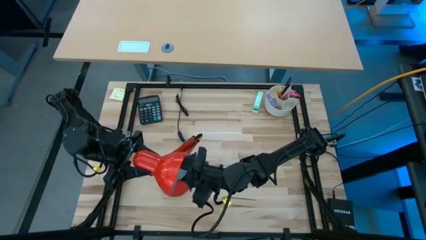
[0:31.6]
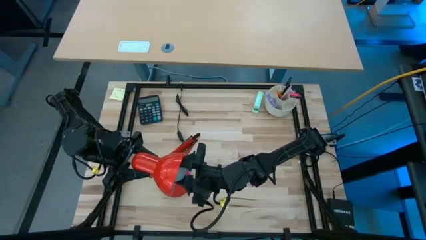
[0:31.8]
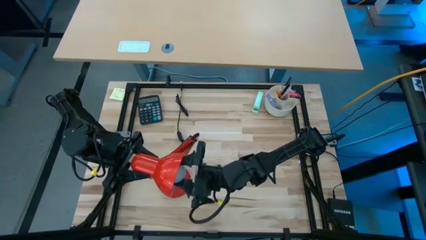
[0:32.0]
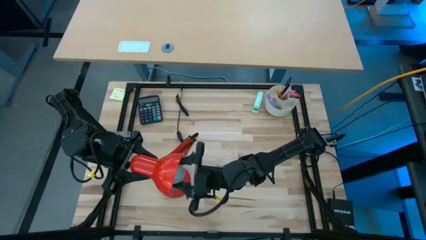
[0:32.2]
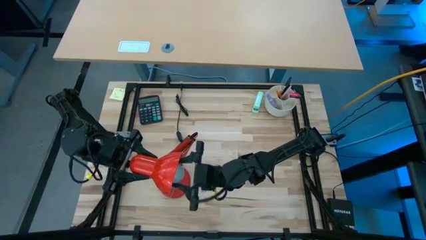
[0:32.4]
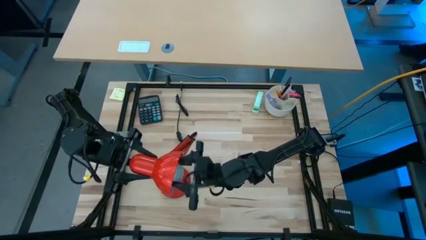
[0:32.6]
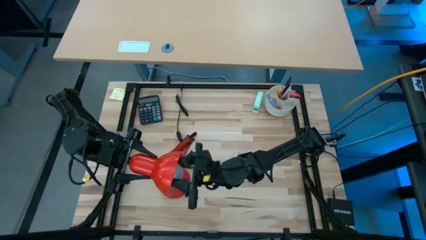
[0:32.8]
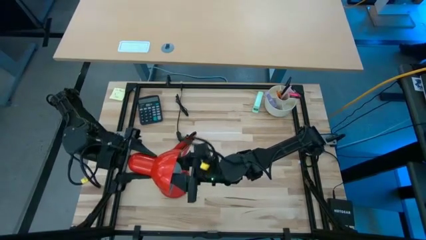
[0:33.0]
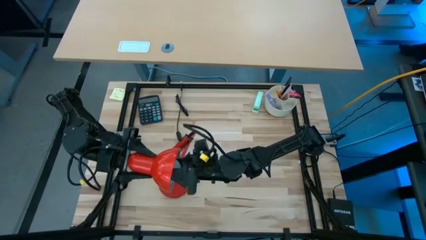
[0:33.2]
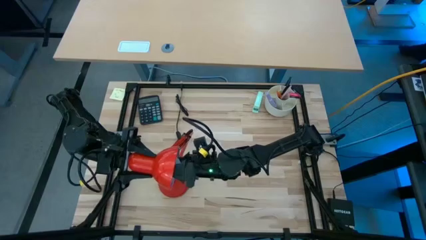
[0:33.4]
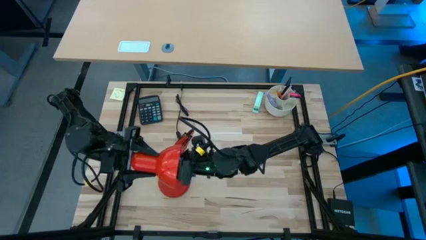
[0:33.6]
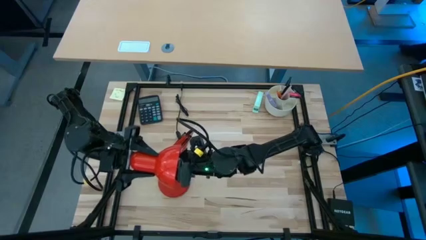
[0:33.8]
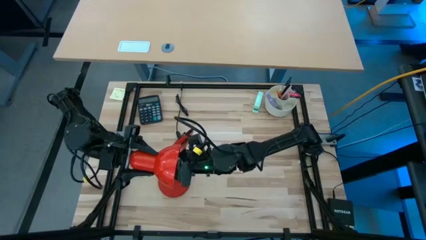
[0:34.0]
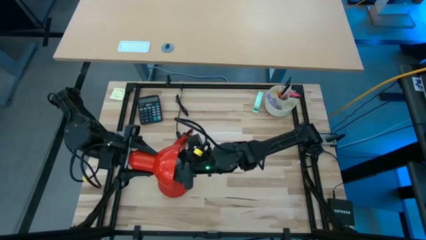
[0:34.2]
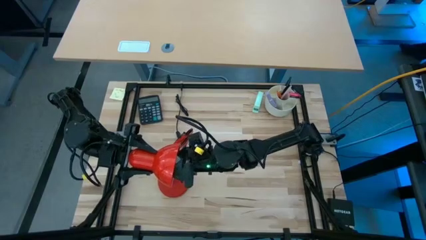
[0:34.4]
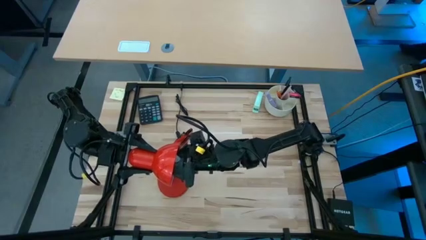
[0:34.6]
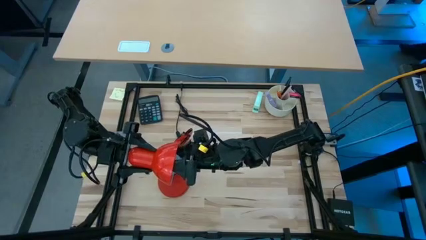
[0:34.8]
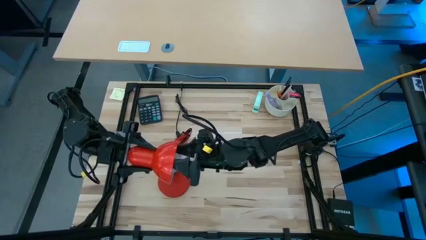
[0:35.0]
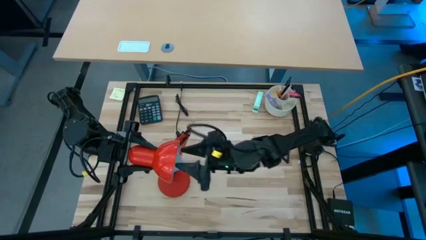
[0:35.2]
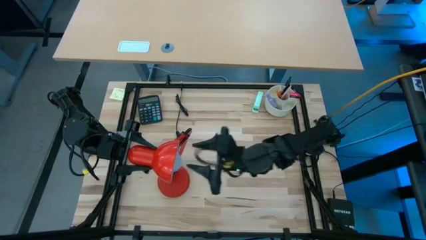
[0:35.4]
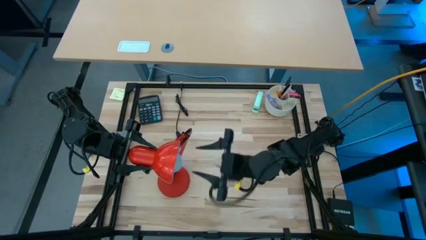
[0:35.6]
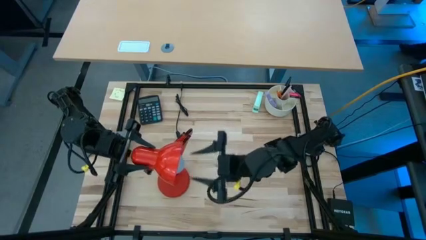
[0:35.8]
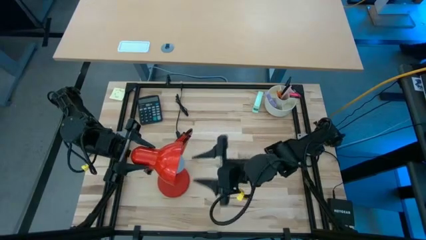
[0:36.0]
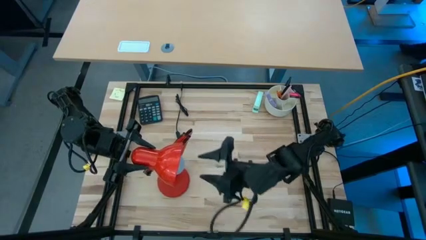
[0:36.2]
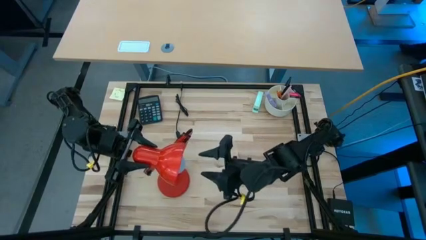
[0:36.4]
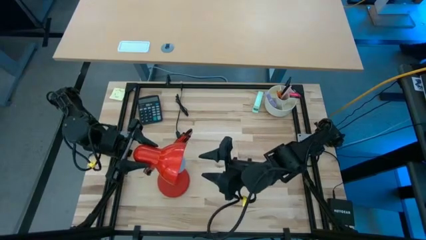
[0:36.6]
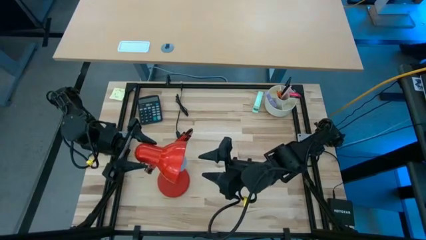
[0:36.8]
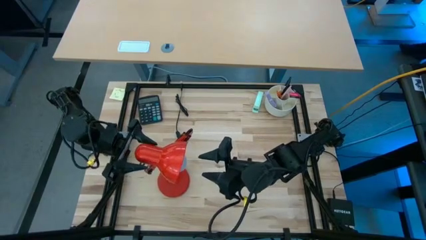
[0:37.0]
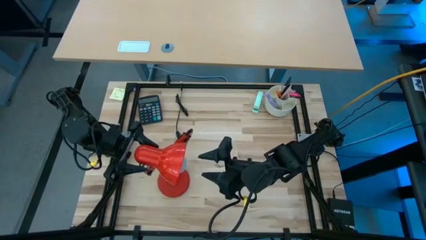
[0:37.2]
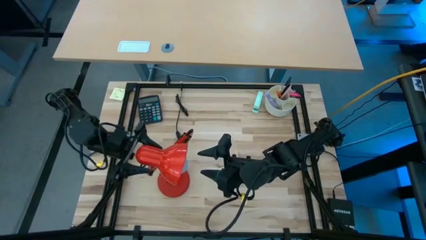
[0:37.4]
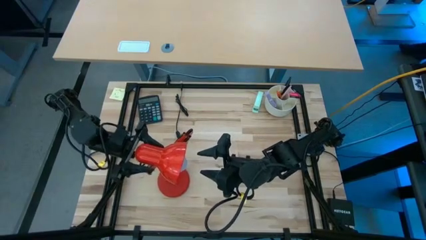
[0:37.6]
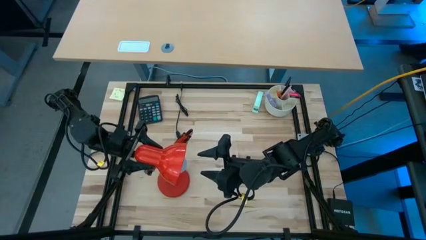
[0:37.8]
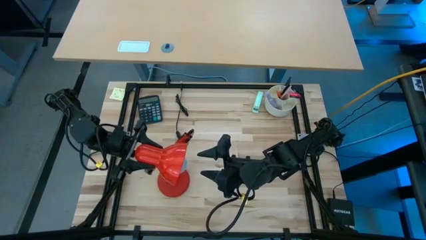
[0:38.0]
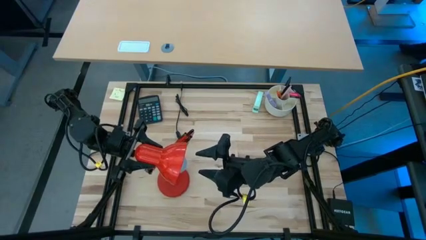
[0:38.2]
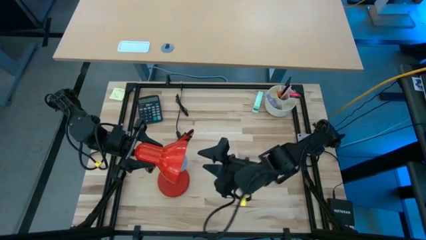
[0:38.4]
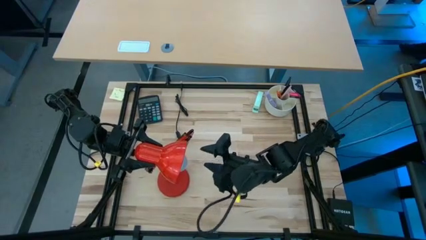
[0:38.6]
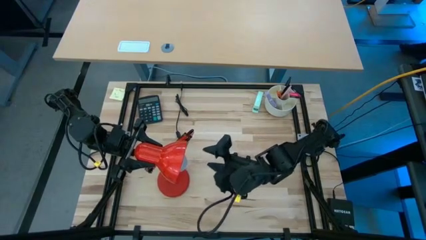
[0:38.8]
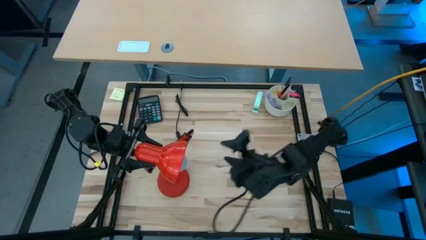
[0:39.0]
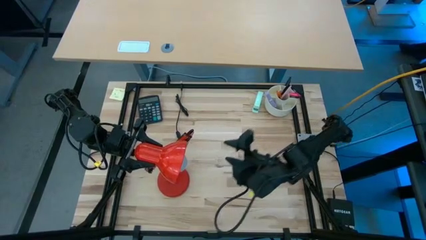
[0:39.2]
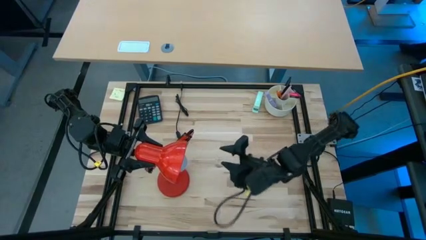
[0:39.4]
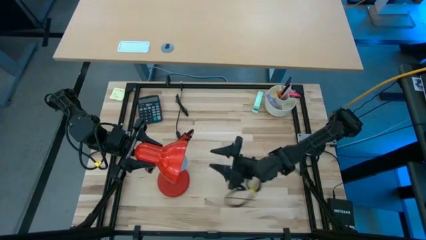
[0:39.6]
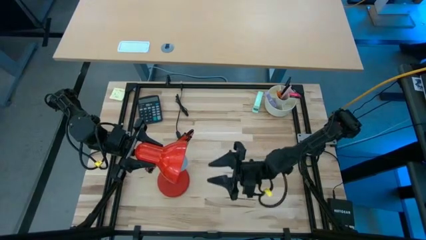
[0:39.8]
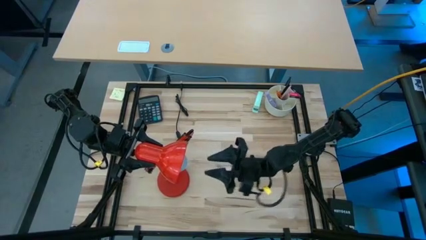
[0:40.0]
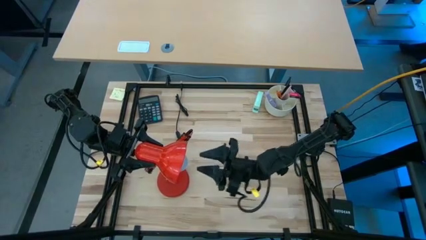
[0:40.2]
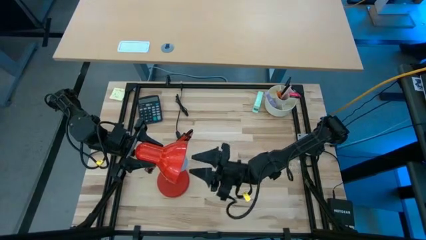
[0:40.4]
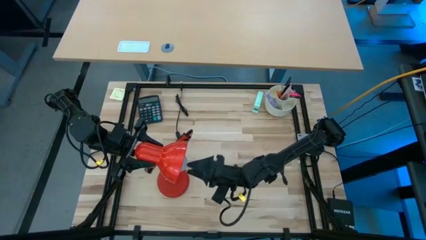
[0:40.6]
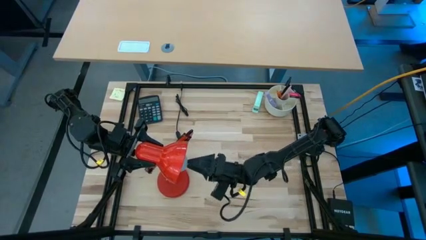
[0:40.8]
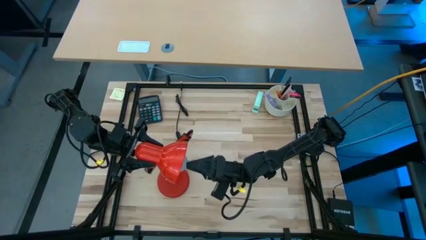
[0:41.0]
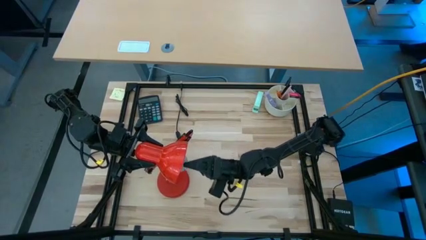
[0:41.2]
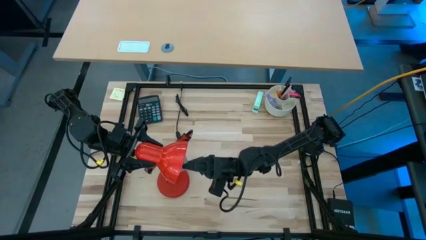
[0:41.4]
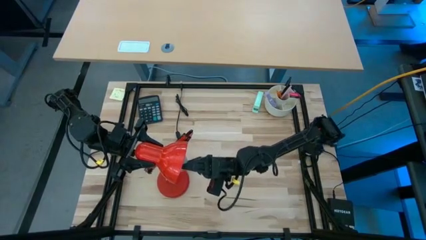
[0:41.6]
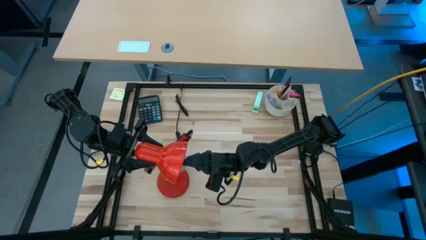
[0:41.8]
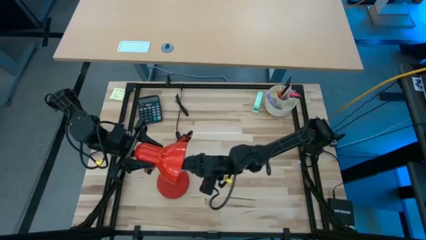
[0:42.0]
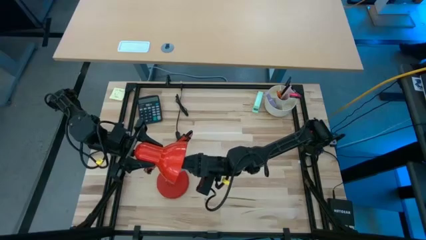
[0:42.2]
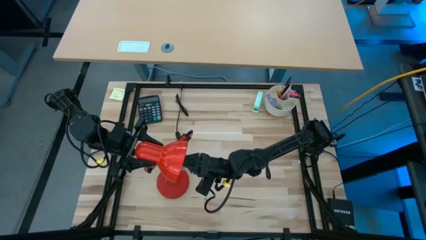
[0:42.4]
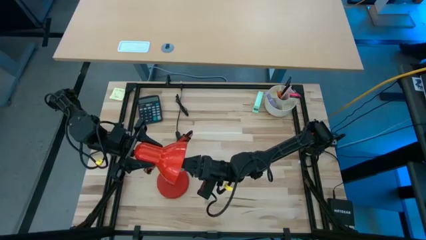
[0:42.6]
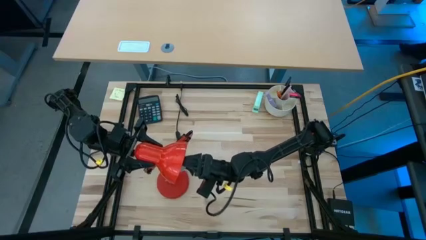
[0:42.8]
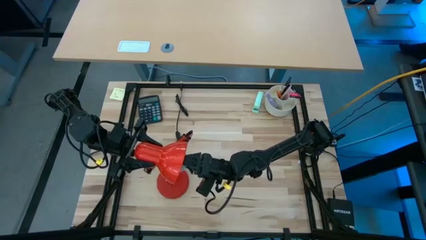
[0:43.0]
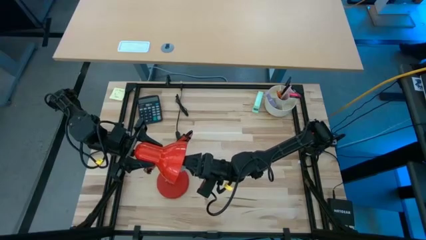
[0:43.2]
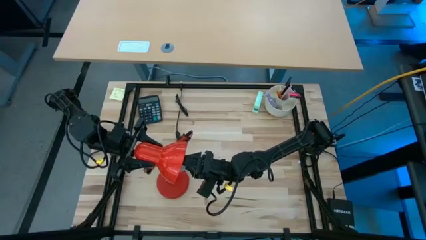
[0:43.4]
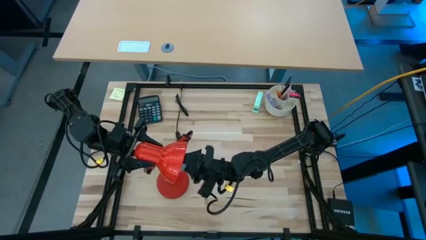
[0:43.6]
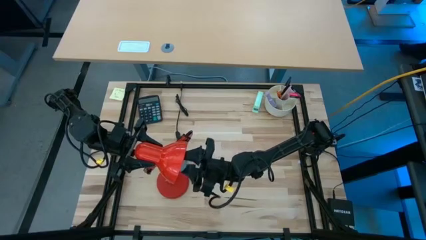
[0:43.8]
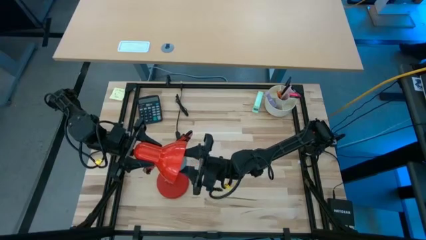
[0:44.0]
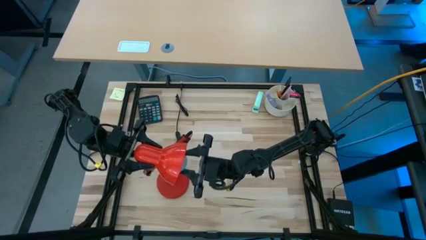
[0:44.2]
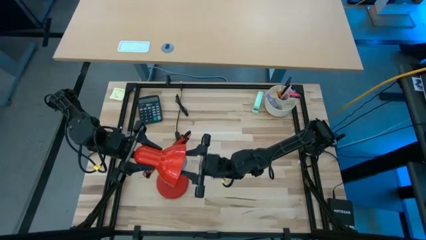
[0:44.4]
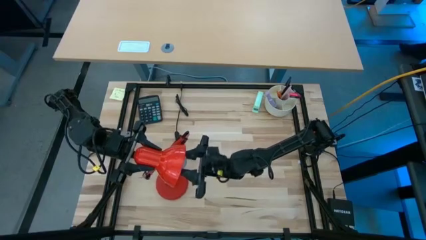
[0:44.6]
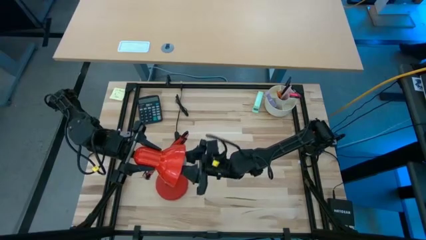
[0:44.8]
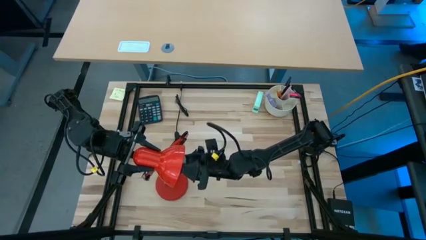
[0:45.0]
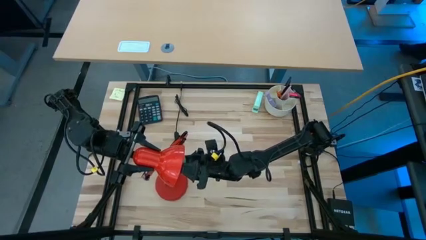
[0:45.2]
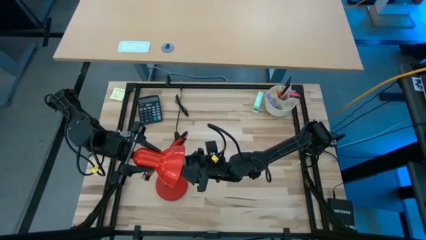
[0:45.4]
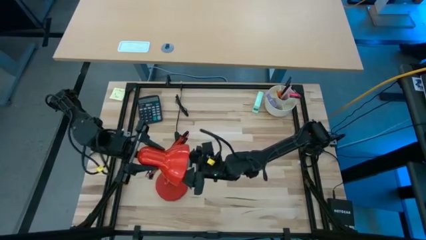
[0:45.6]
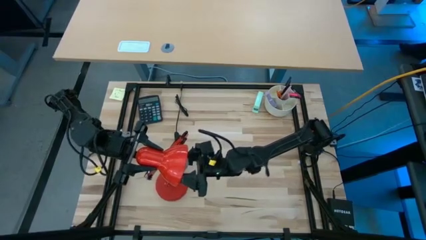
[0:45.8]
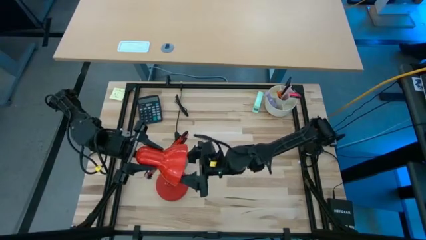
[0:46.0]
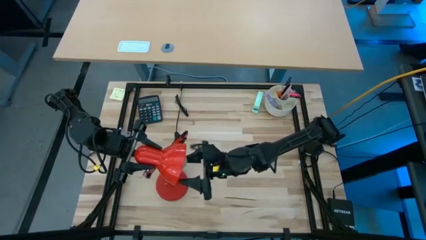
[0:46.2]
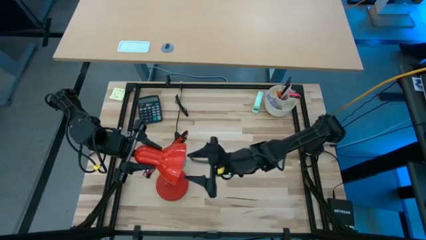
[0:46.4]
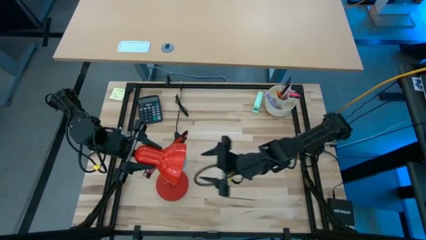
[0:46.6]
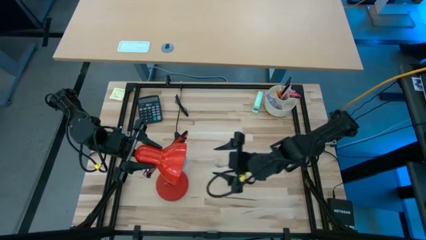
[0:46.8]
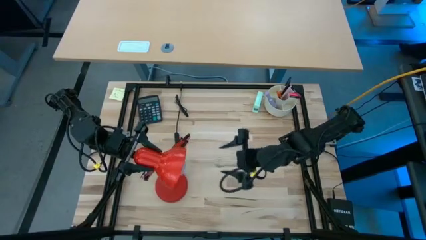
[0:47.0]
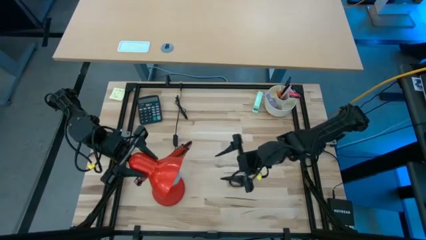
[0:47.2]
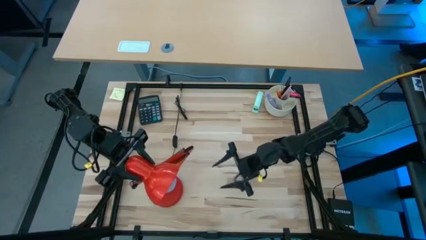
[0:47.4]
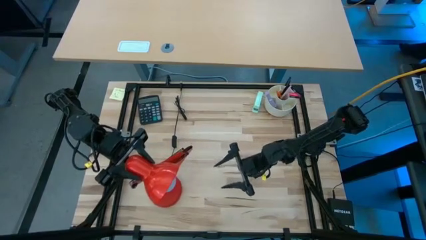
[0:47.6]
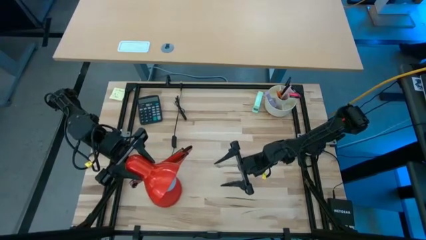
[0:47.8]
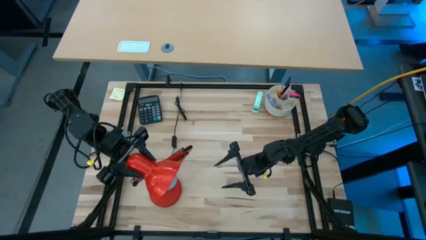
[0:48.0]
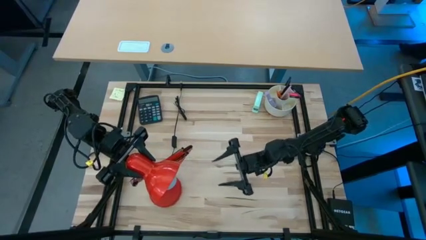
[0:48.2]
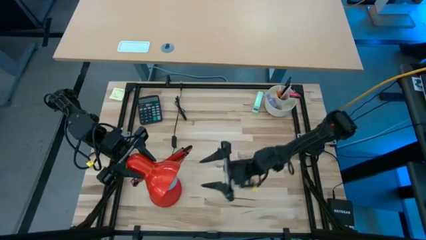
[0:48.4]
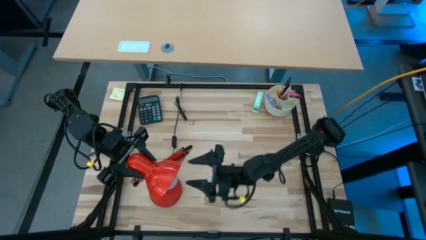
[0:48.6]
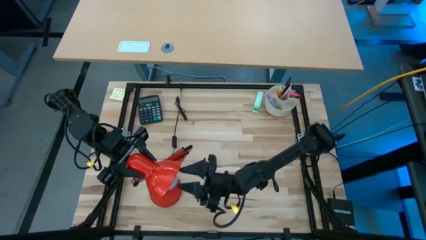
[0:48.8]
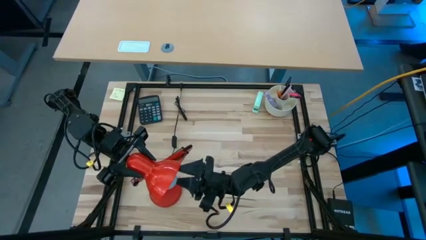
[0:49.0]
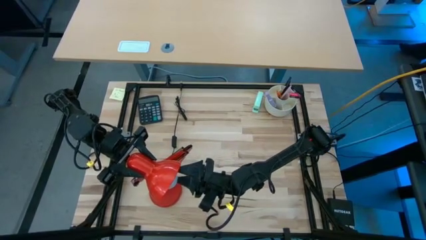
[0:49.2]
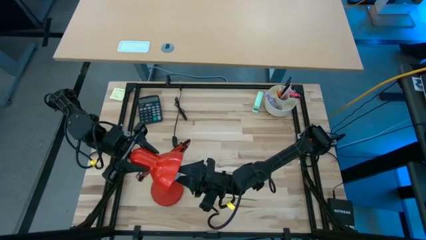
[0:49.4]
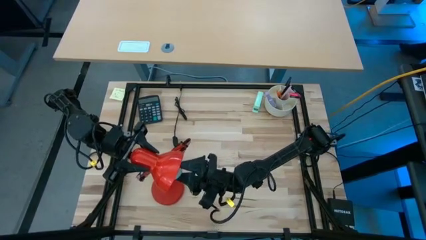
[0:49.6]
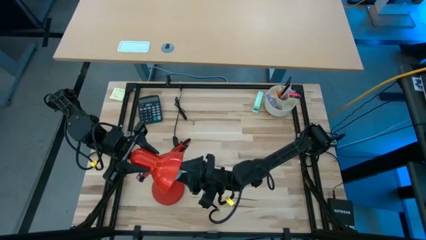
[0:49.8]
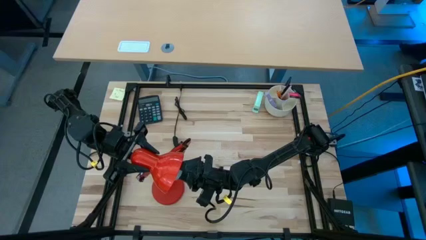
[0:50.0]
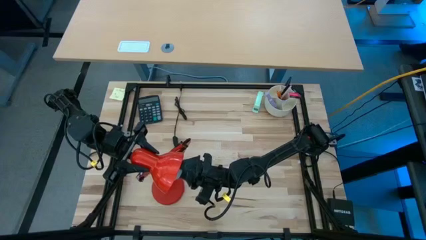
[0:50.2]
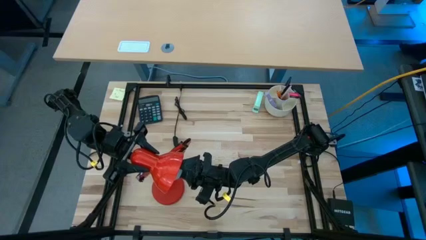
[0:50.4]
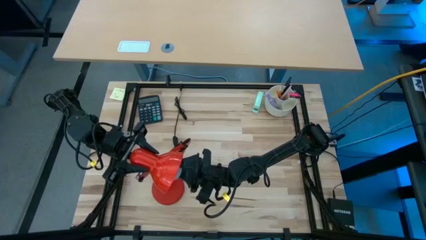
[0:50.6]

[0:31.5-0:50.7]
Task: Screw lightbulb
Insert the light bulb into the orange desk lamp
